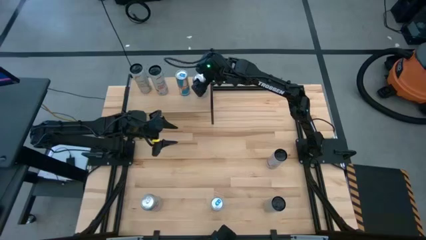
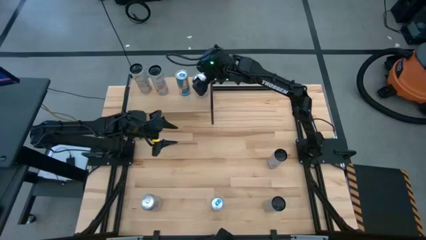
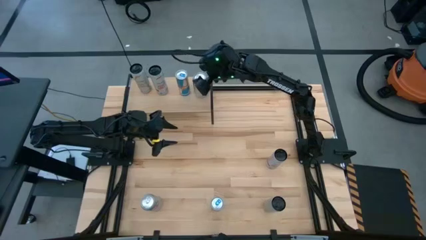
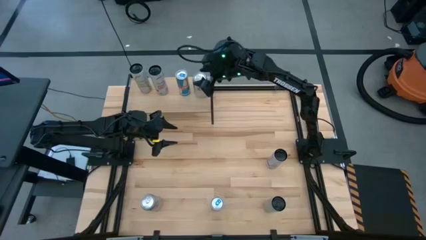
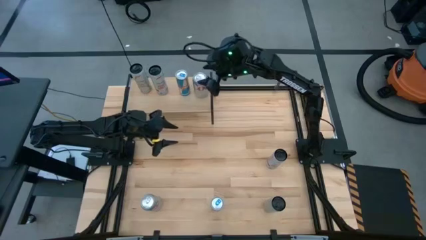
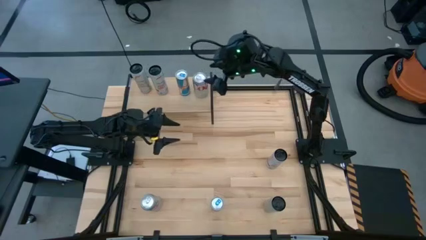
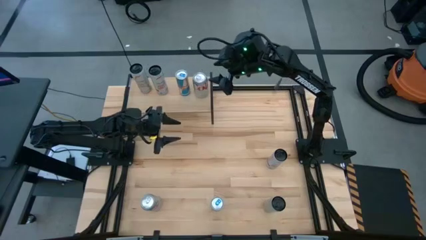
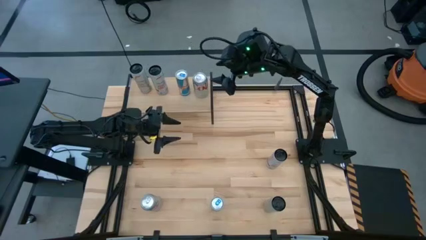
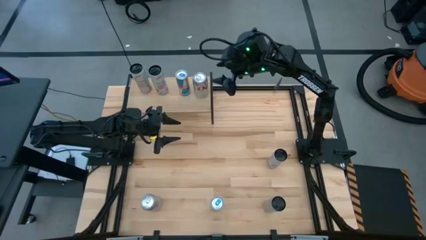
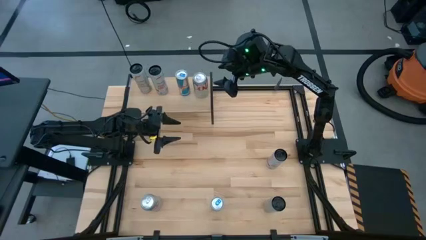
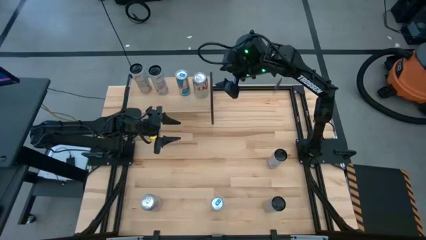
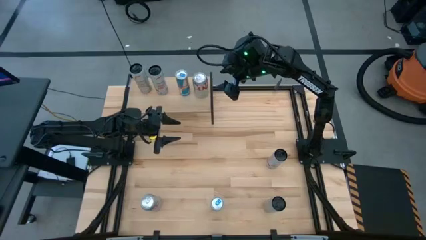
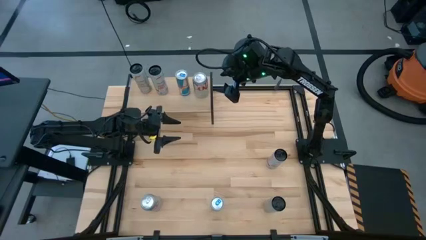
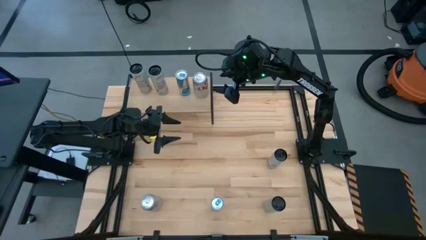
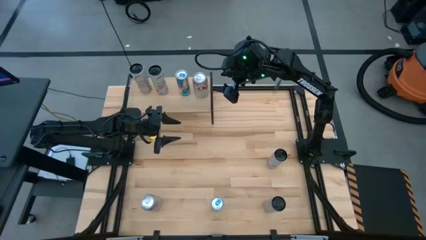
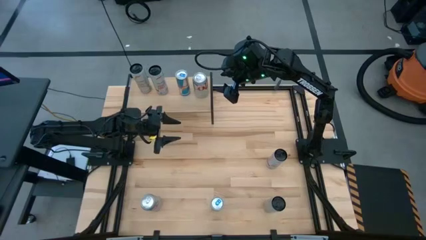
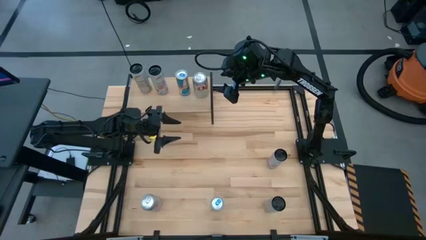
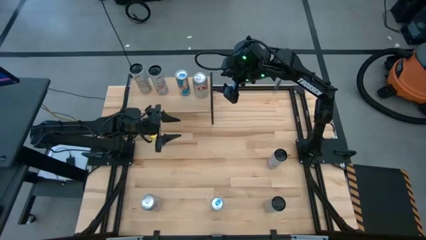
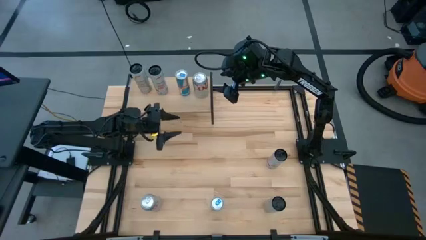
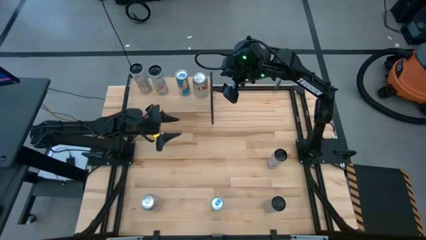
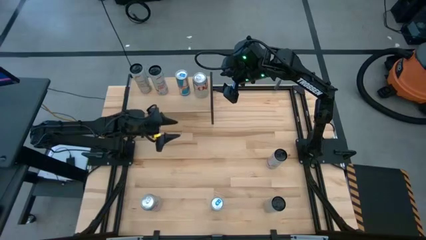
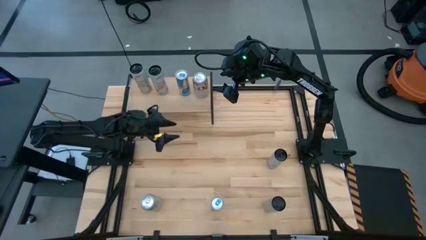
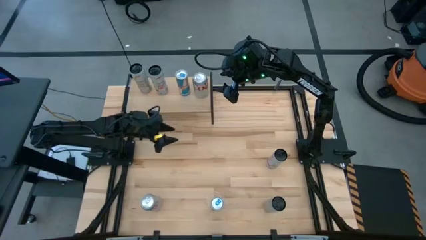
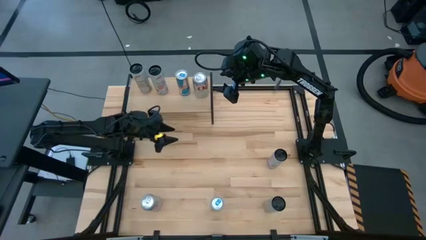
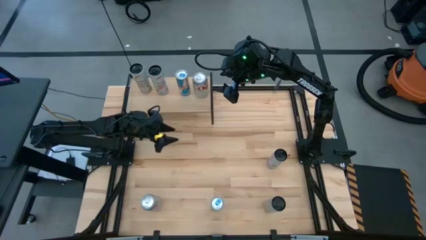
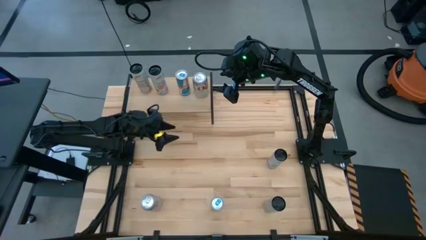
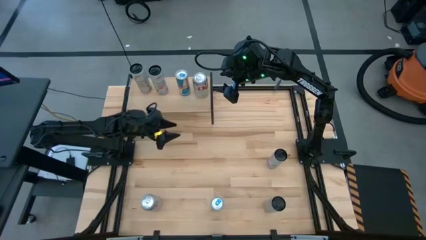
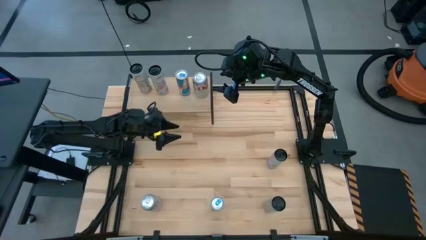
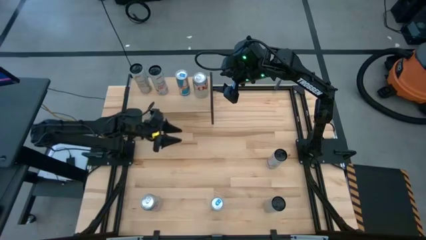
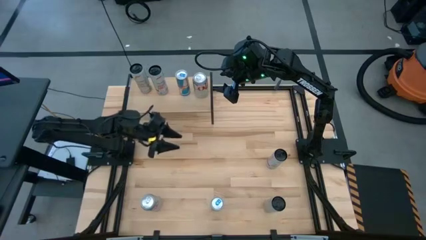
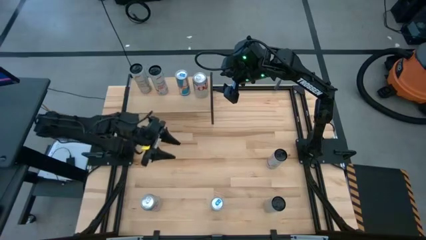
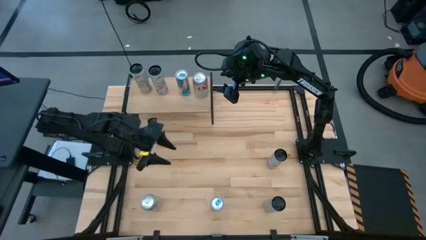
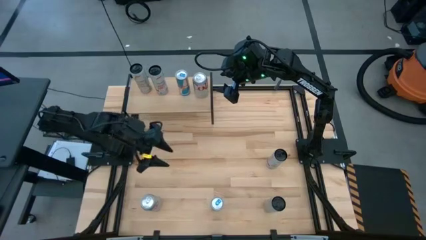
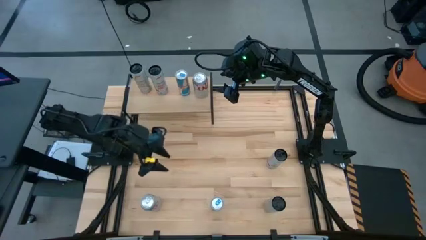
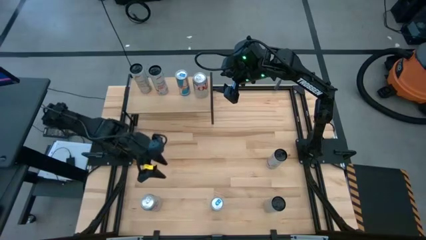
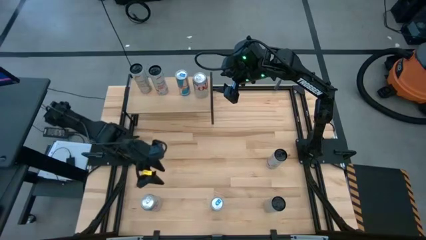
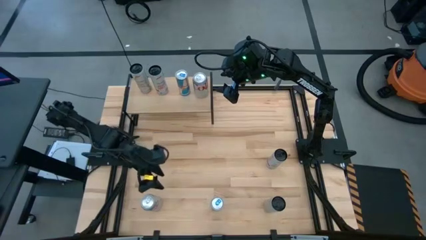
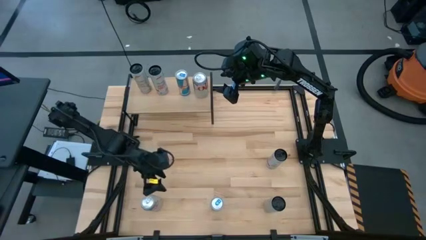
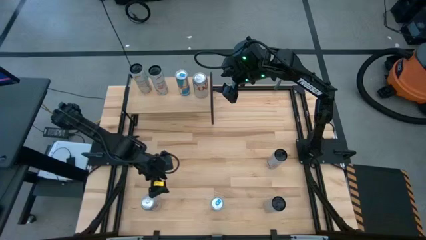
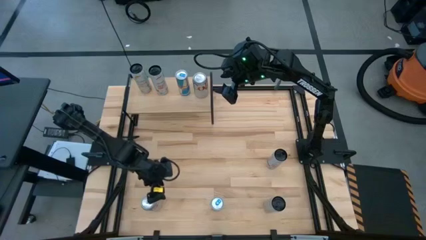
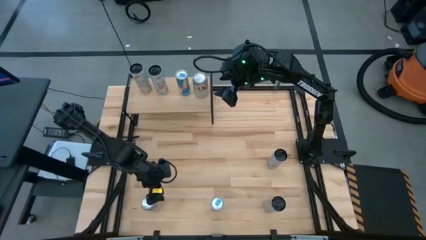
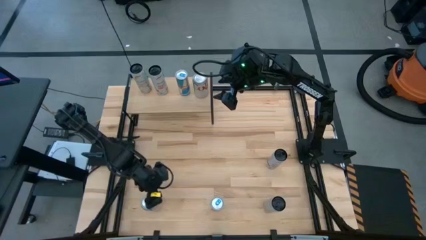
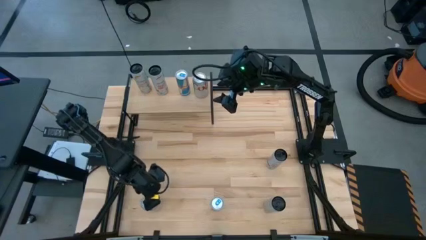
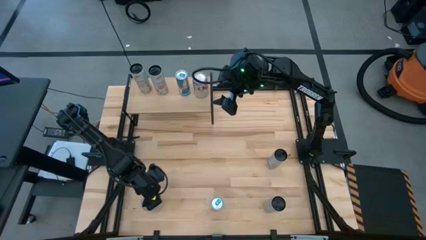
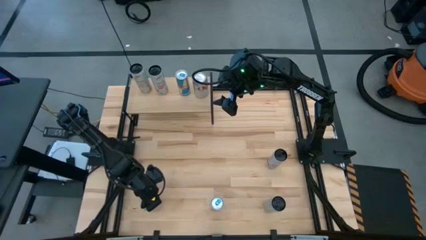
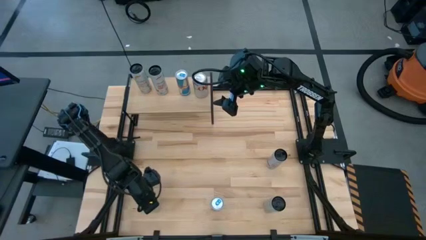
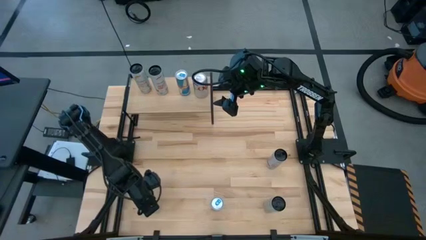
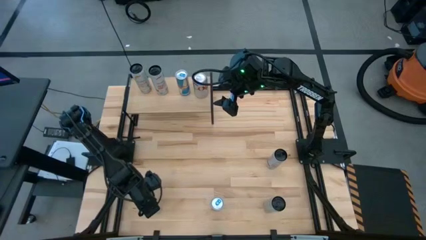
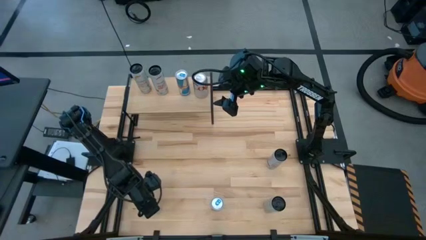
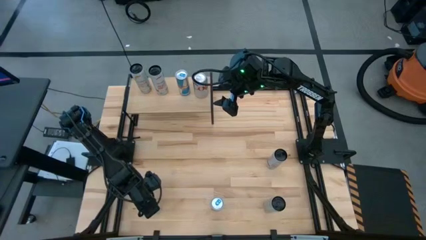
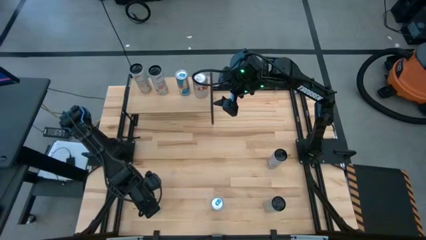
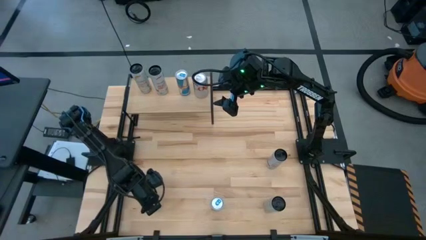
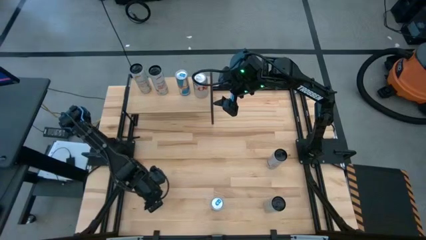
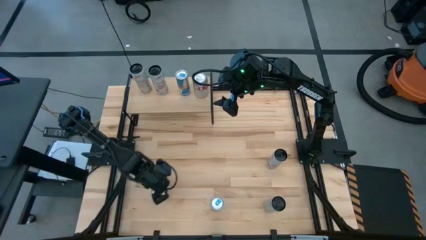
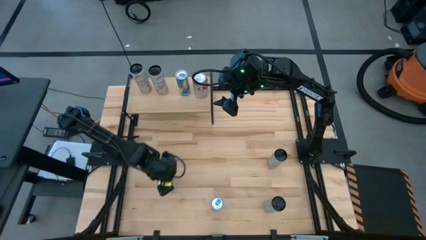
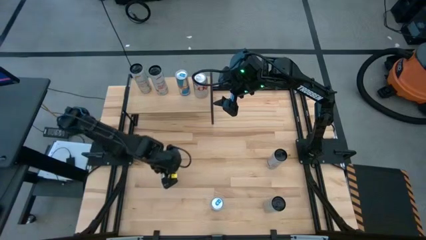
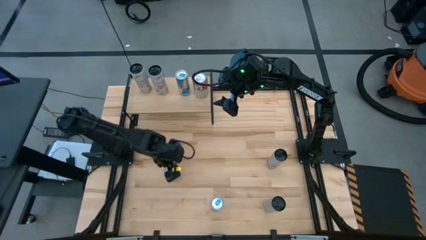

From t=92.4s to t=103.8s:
Task: Place canned beverage on shelf
Put the red-silver soda can on the shelf aligned with the other red-silver soda can

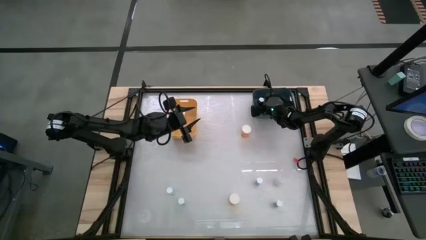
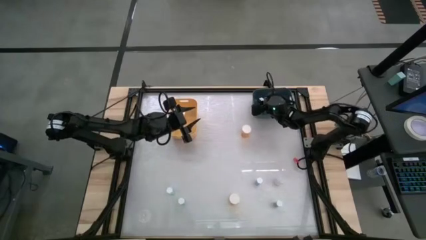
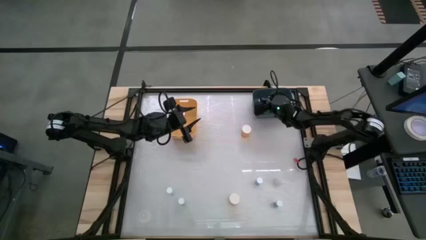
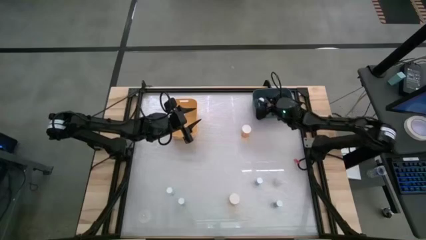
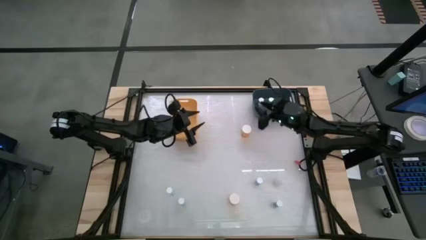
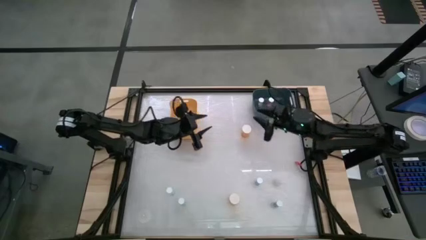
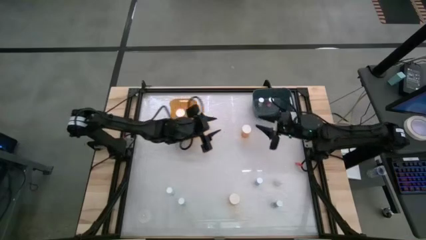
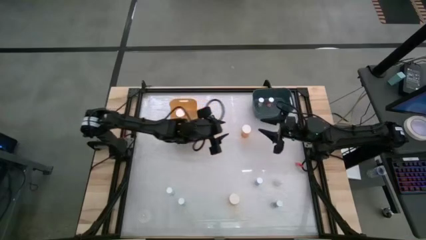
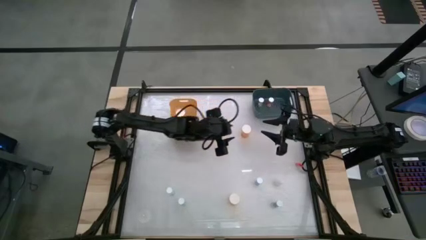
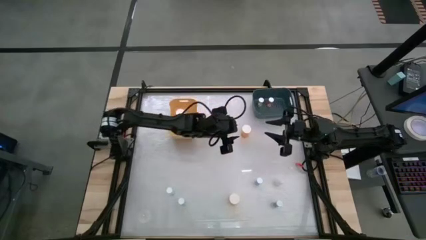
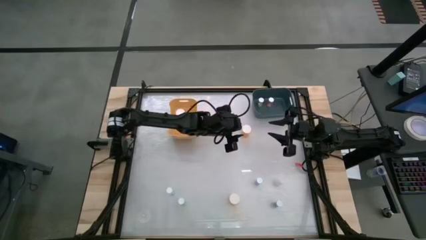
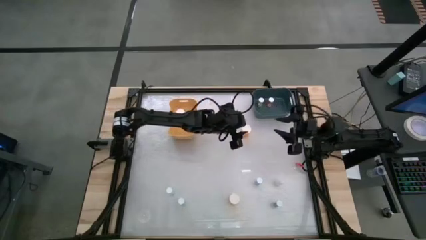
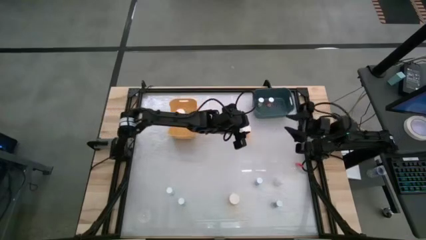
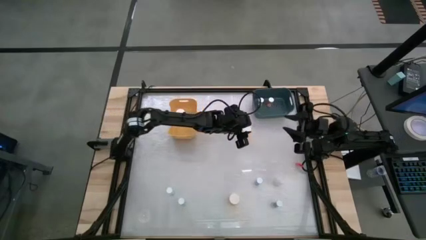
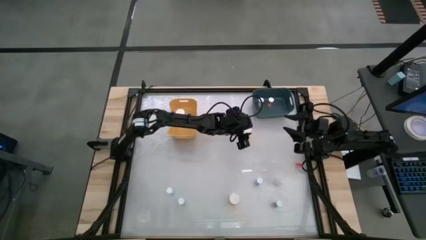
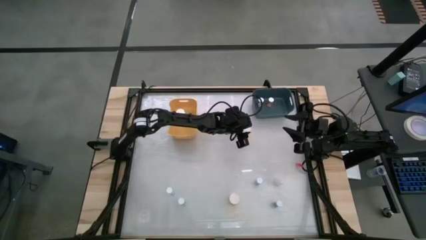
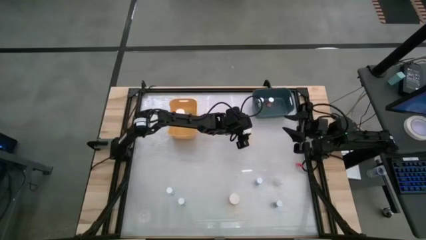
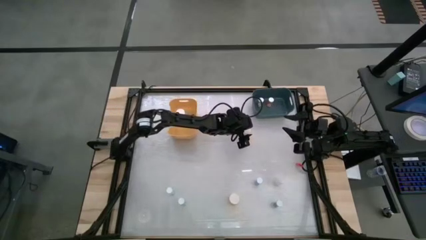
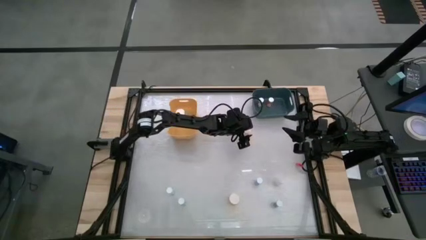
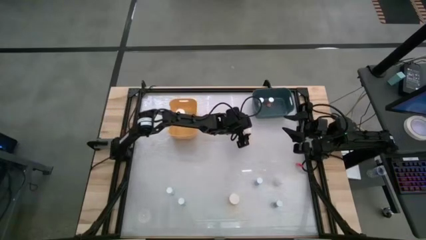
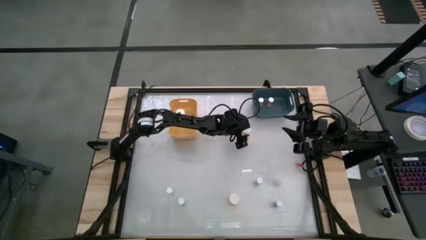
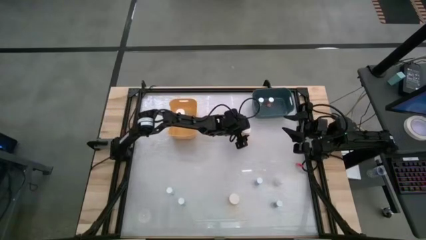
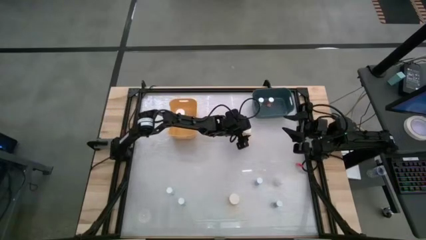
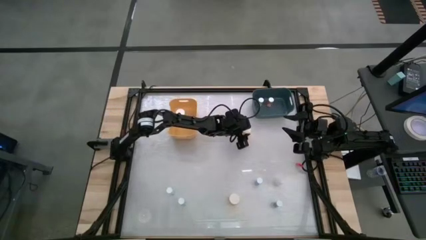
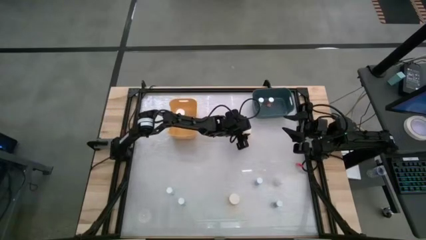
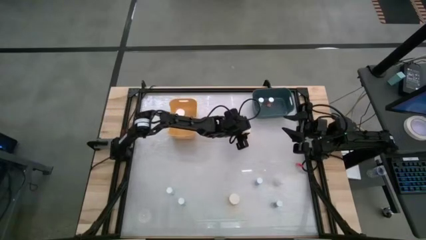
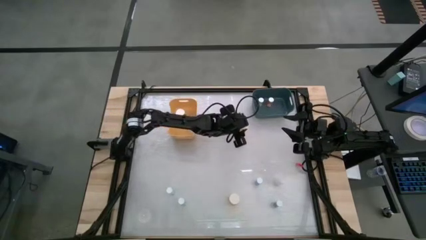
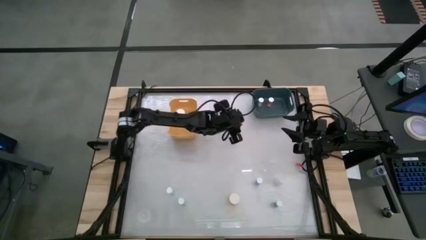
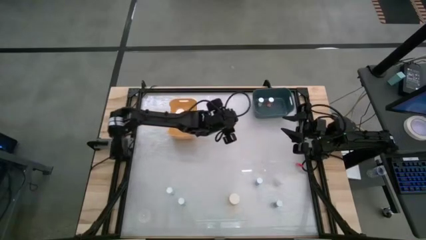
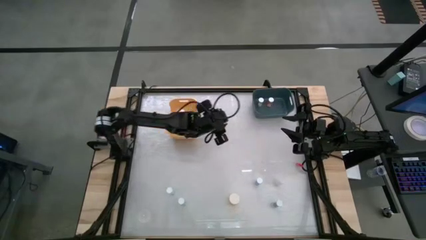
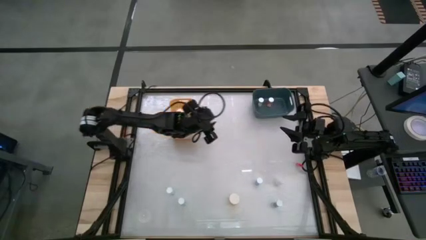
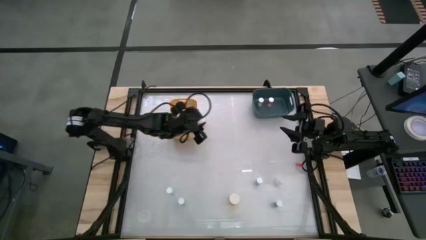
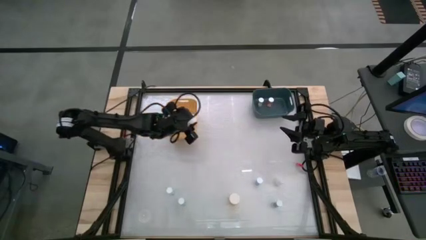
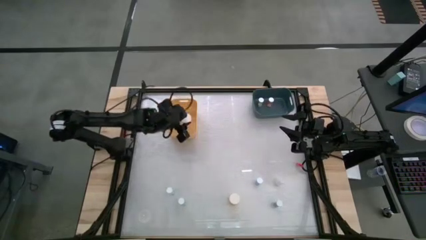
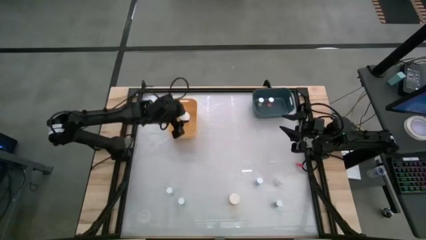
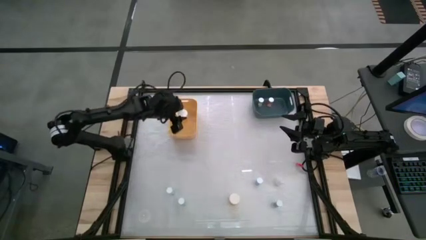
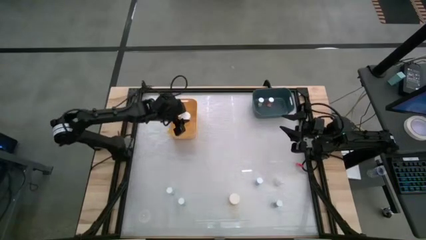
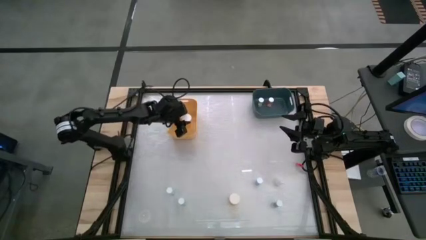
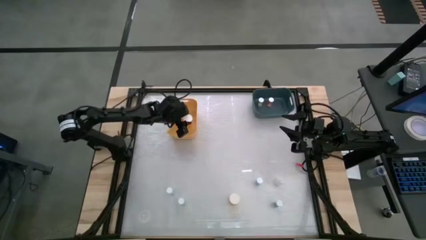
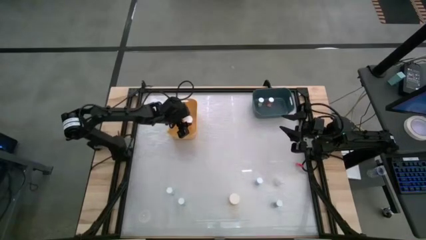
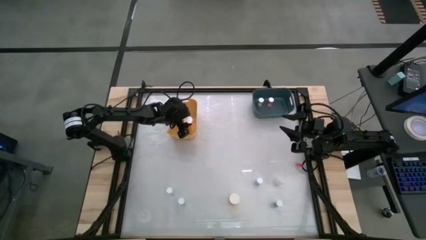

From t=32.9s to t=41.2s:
Task: Pick and place medicine bottles into bin by pill shape (circle, oval)
Put the yellow bottle pill into the blue bin
